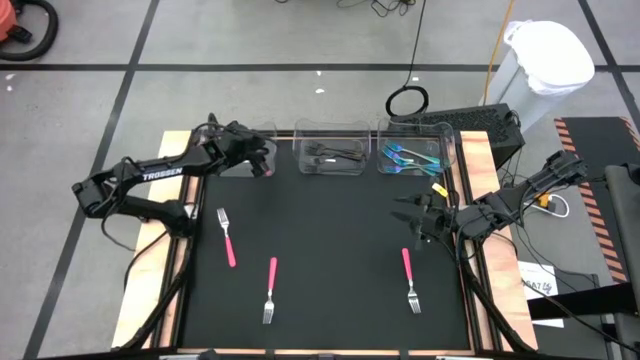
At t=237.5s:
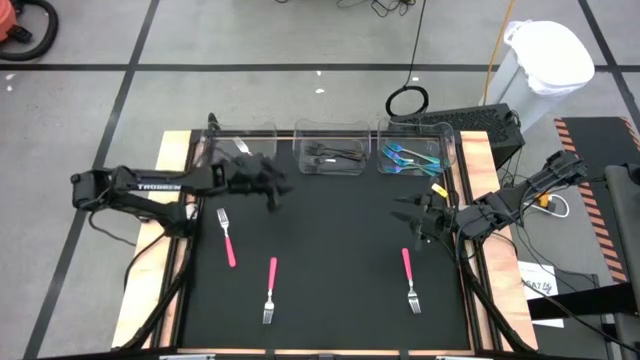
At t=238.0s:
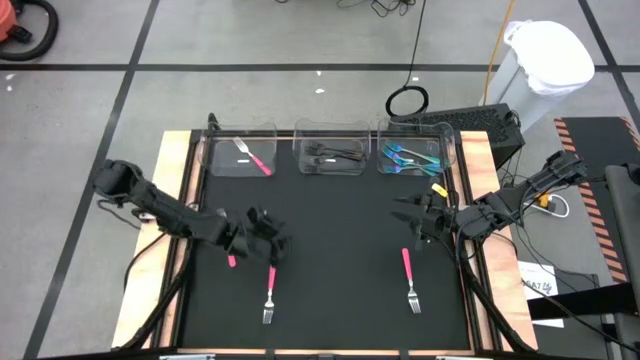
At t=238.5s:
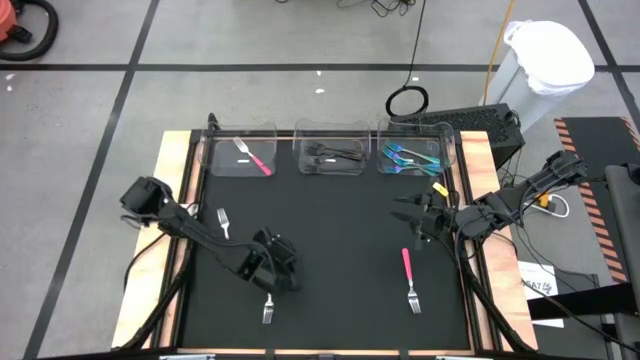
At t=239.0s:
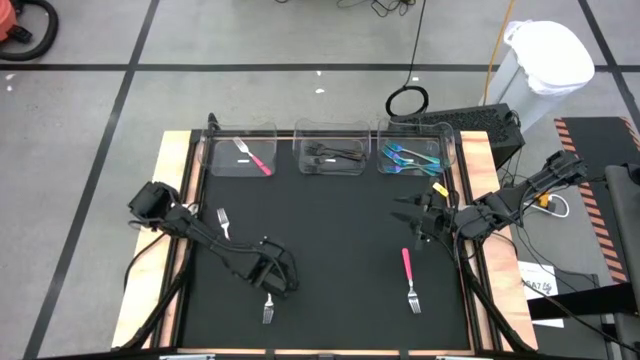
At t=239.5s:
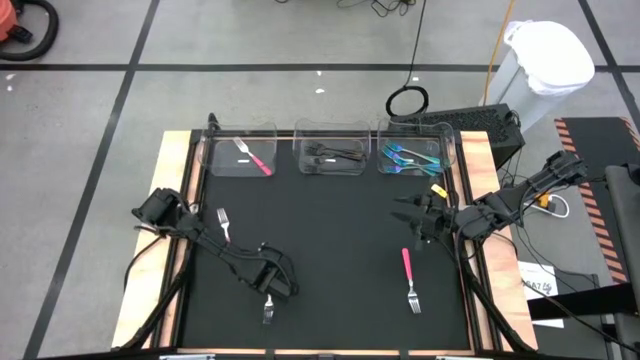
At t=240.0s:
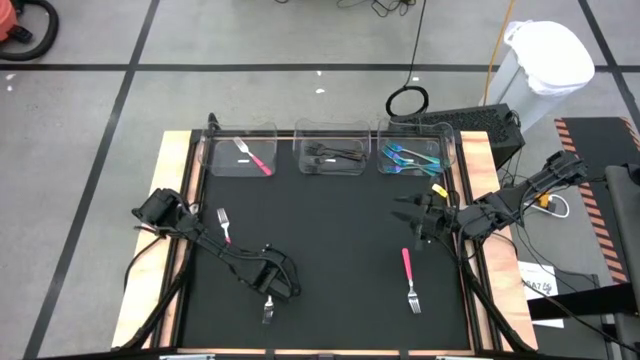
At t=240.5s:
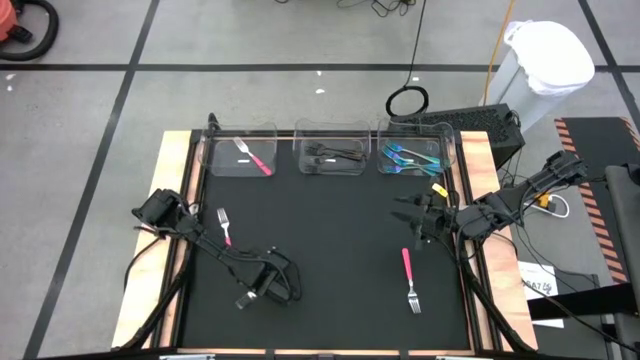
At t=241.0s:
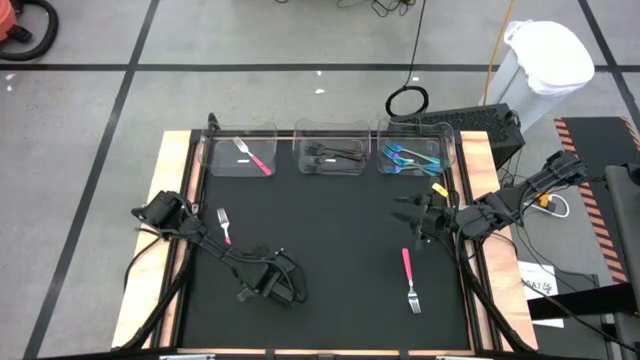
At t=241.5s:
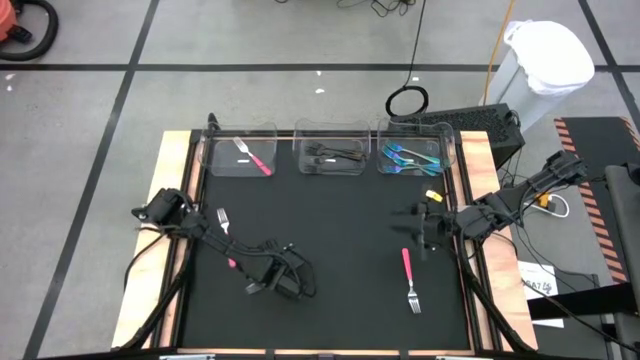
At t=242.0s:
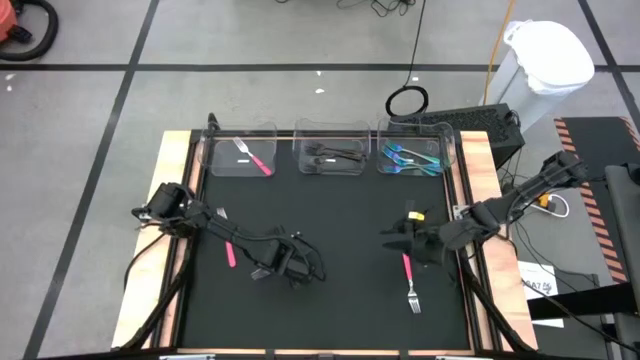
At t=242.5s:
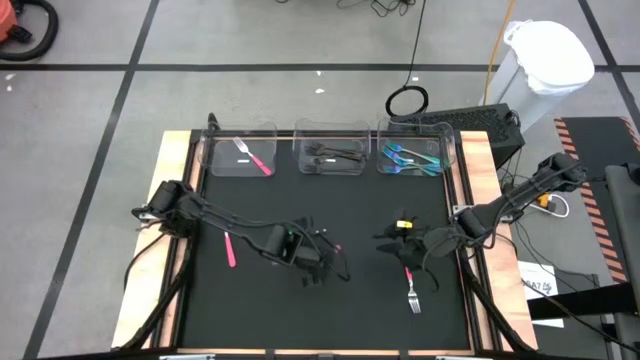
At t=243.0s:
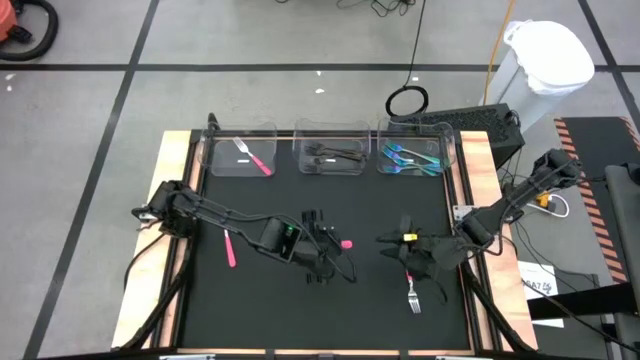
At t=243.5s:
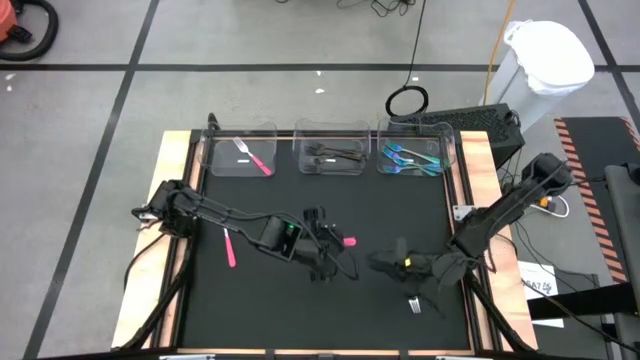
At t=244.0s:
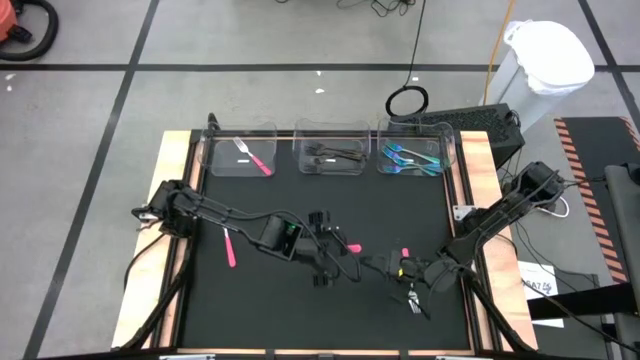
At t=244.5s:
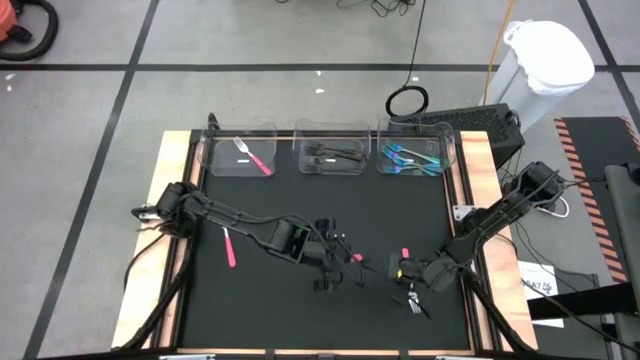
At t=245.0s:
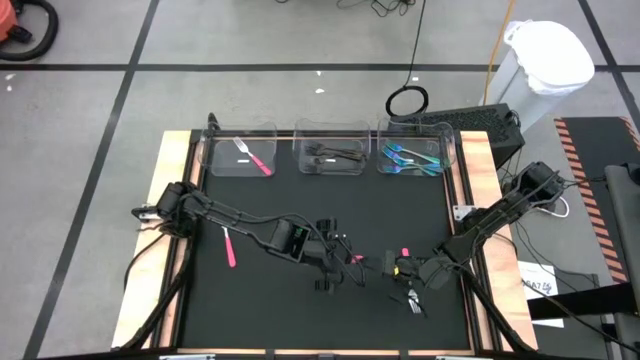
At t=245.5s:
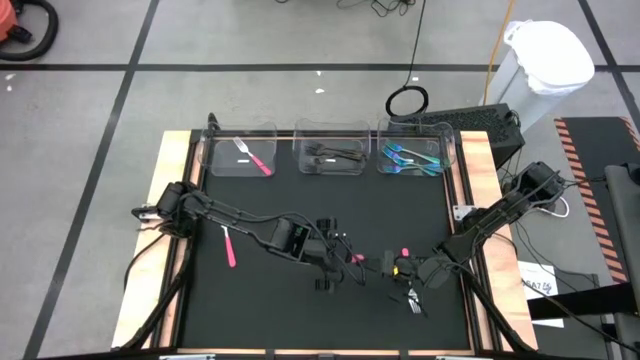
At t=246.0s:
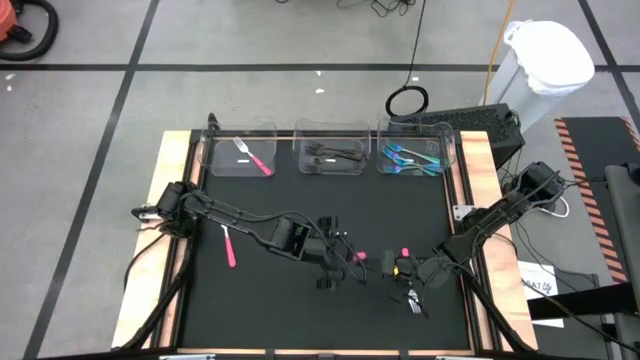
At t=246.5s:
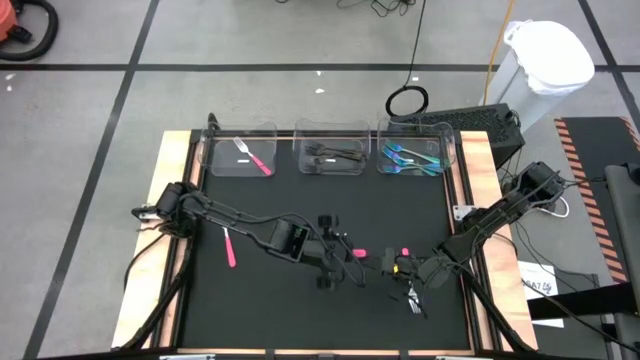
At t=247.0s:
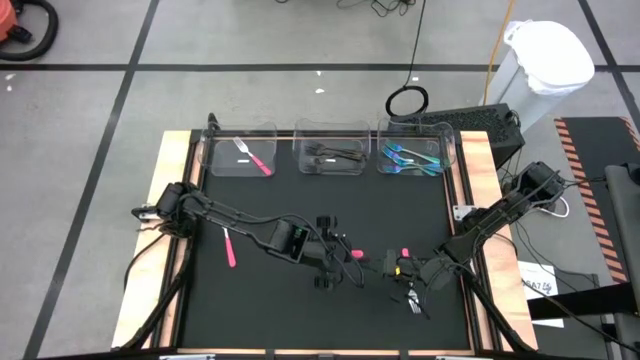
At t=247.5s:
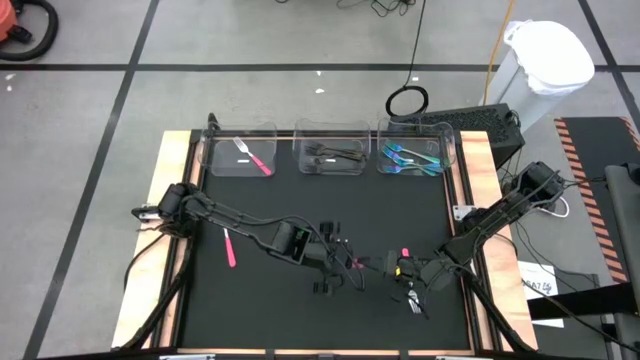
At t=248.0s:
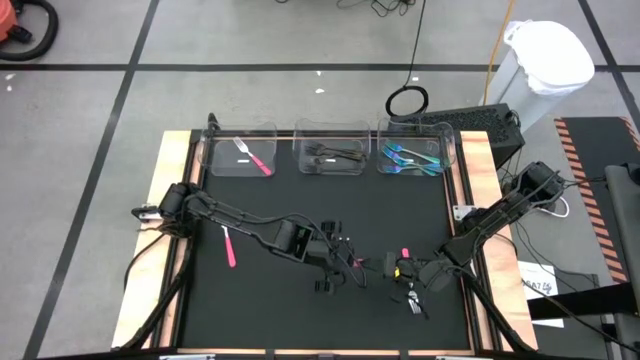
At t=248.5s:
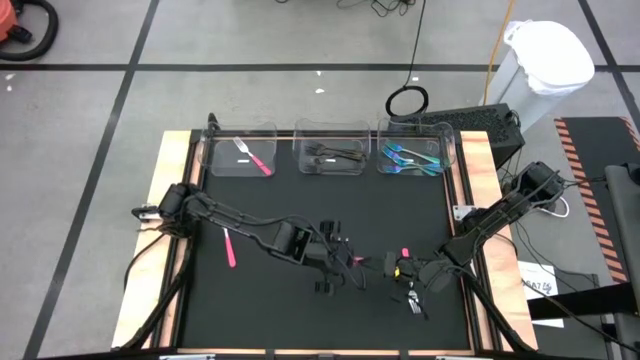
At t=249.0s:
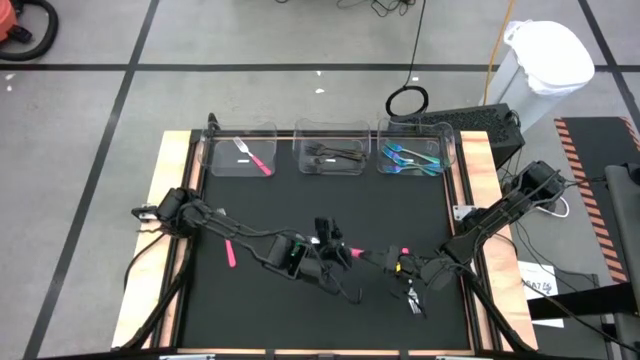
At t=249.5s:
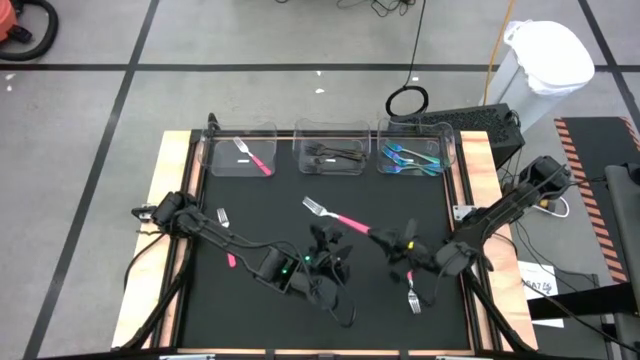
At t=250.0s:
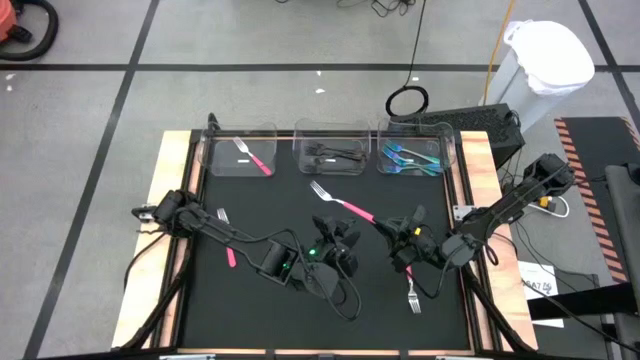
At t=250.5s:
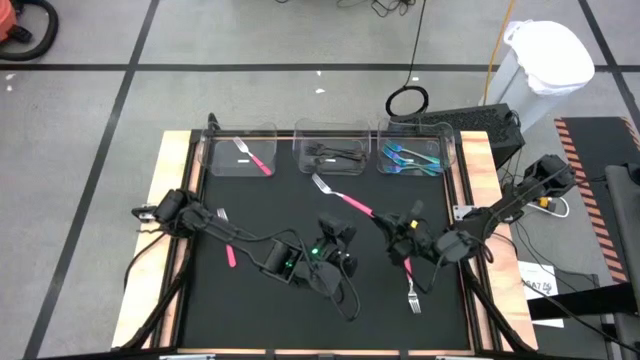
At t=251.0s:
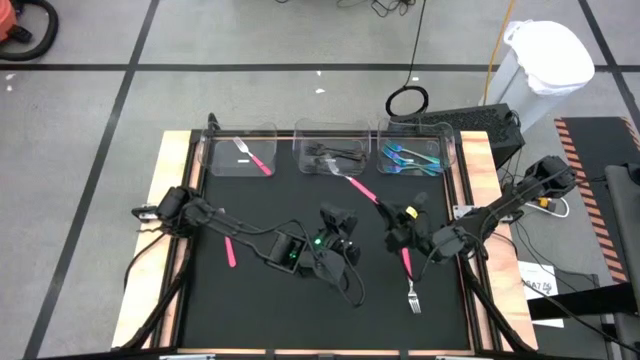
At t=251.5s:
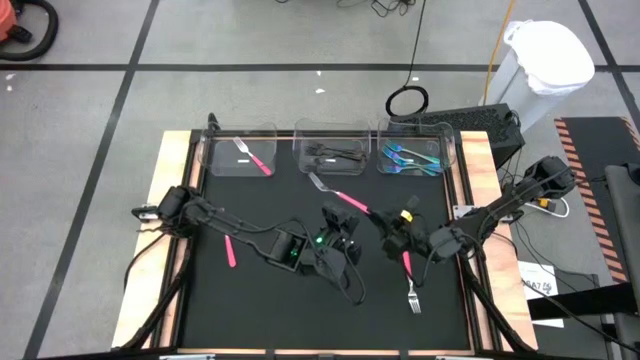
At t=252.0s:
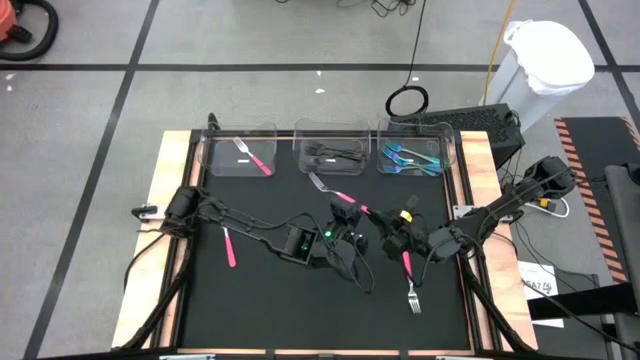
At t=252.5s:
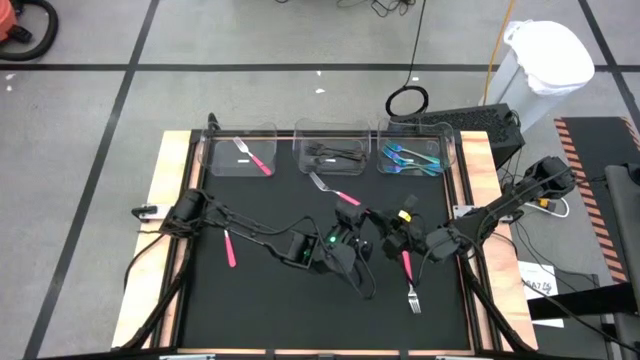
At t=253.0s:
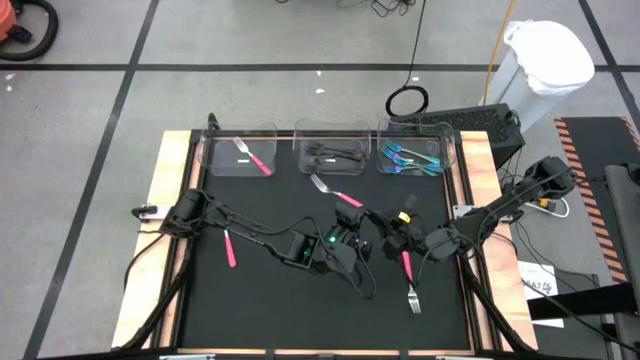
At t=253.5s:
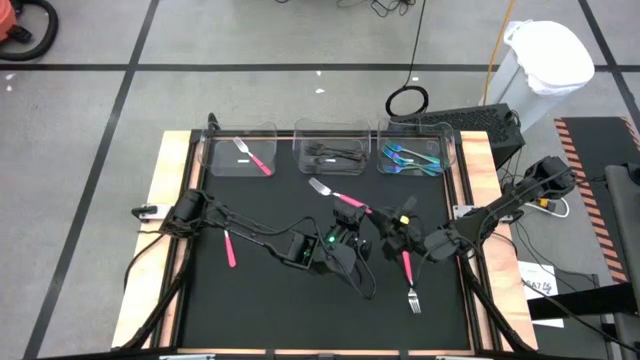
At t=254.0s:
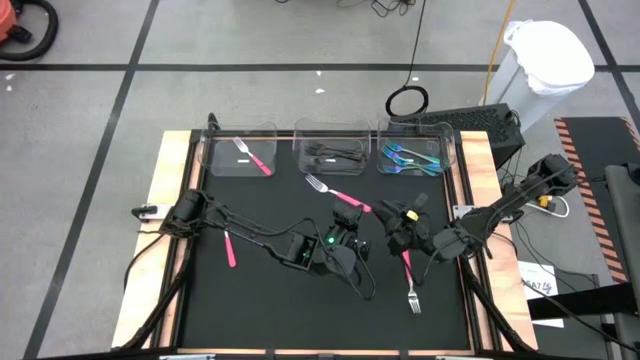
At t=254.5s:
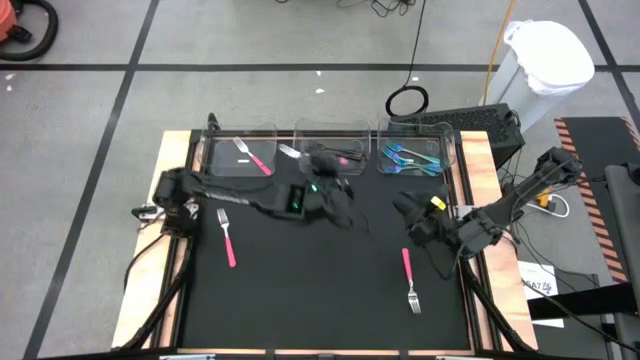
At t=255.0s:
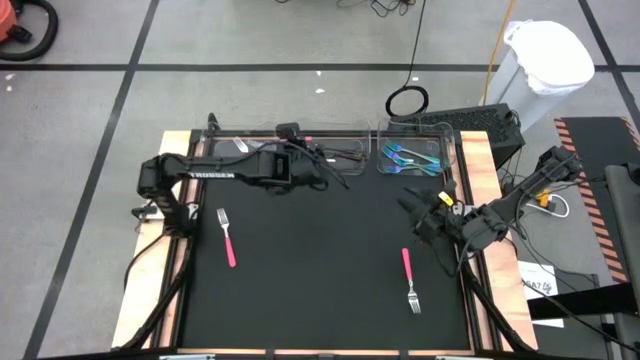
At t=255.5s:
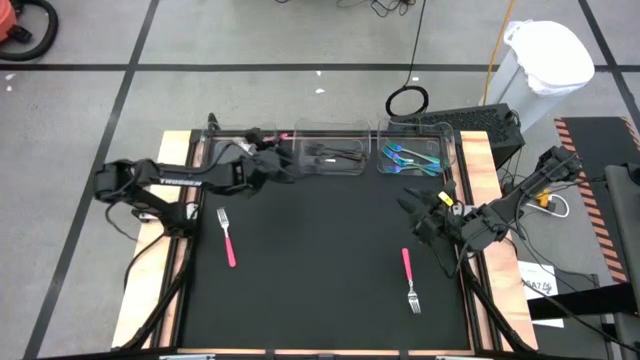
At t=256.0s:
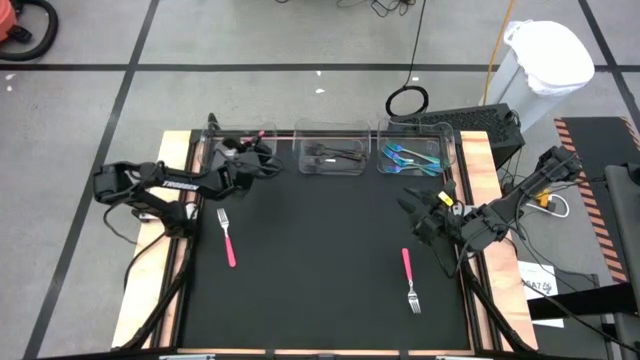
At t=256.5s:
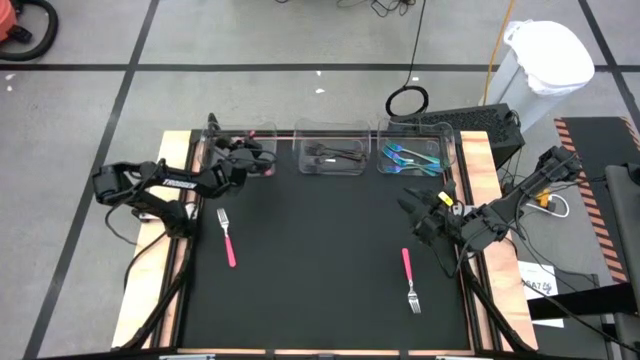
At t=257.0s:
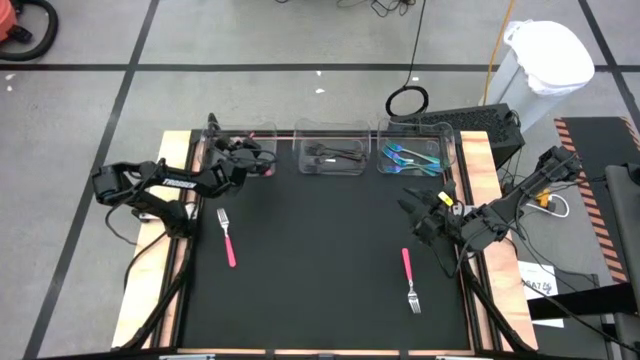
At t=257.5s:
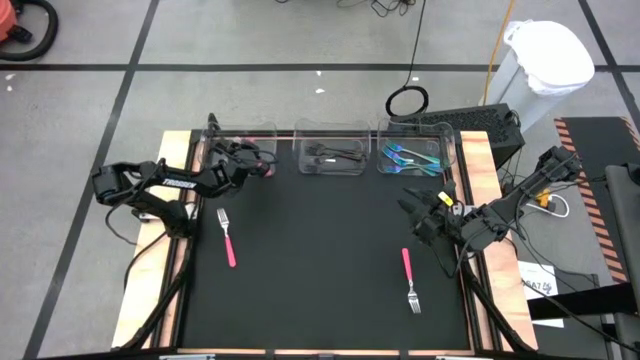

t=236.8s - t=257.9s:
Task: Sort silverware by color (type)
Put the pink fork into the left transparent bin
